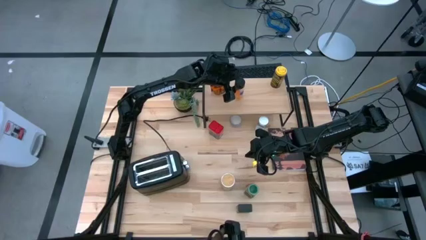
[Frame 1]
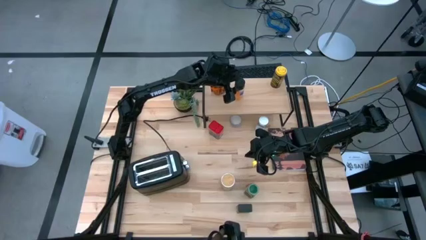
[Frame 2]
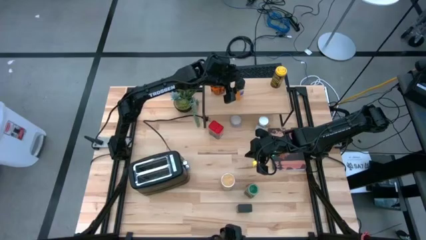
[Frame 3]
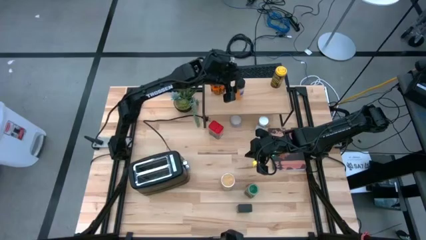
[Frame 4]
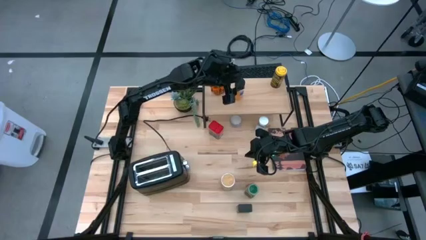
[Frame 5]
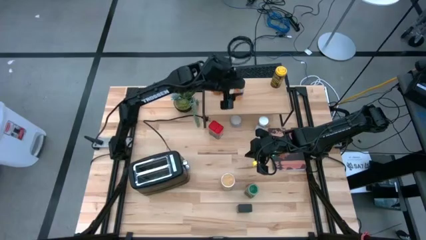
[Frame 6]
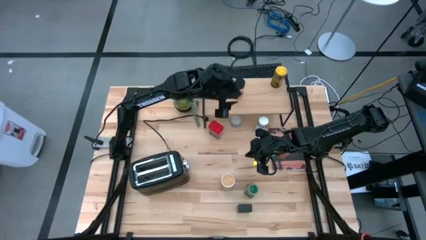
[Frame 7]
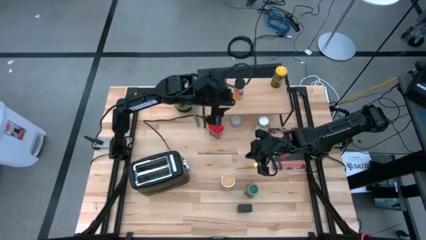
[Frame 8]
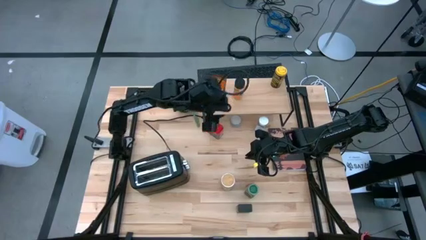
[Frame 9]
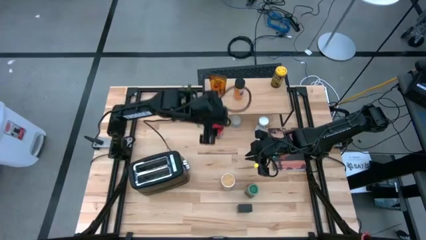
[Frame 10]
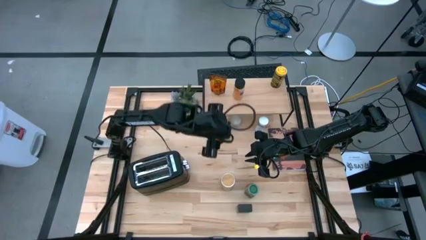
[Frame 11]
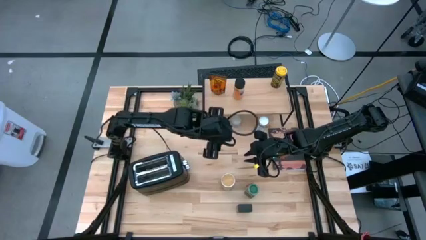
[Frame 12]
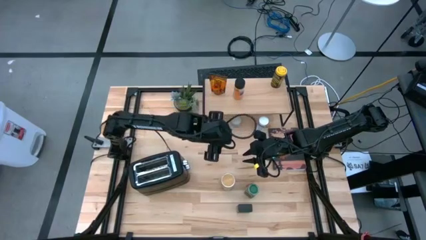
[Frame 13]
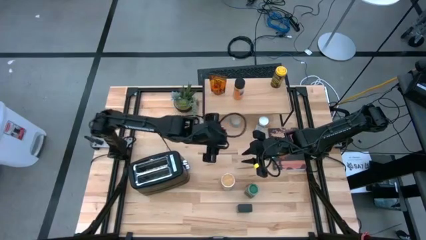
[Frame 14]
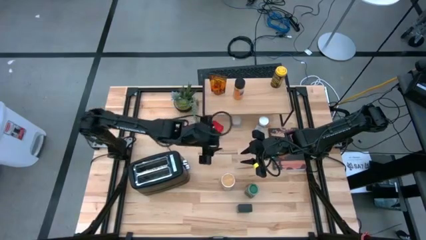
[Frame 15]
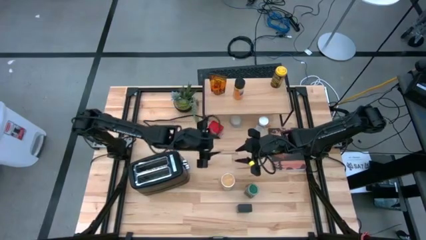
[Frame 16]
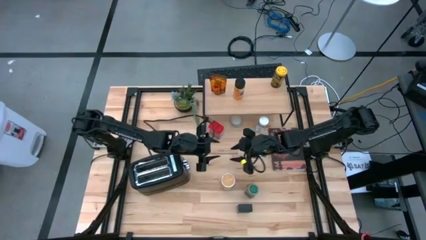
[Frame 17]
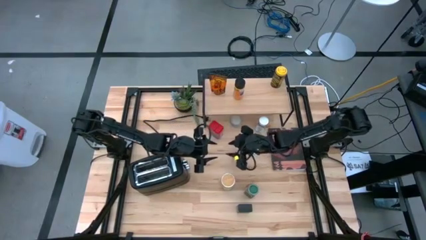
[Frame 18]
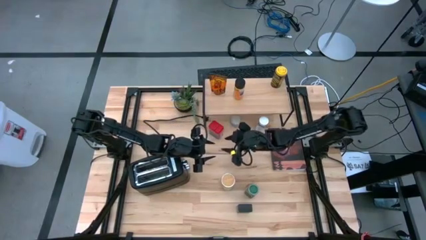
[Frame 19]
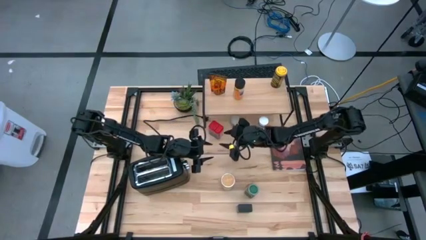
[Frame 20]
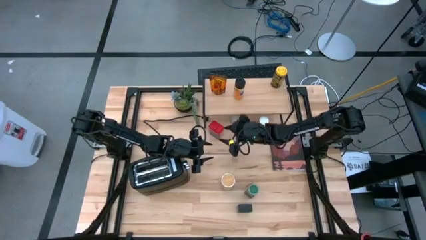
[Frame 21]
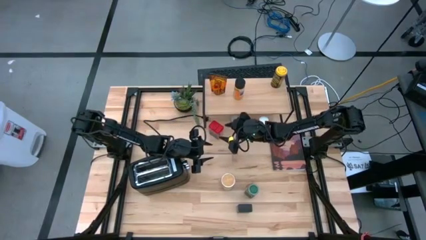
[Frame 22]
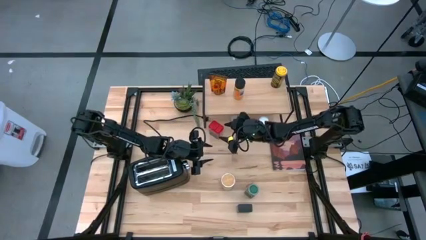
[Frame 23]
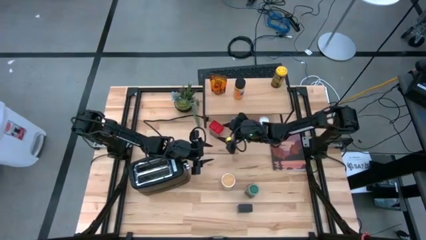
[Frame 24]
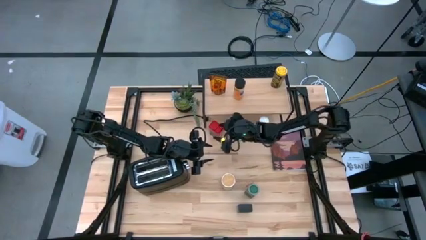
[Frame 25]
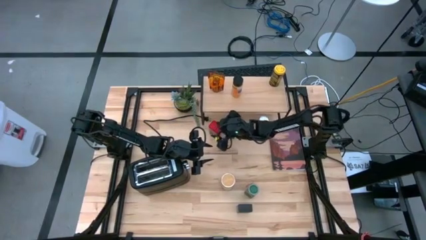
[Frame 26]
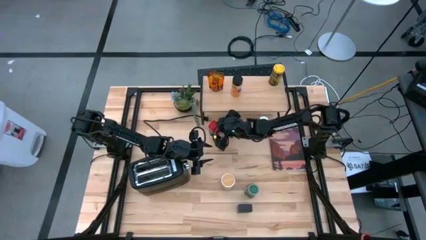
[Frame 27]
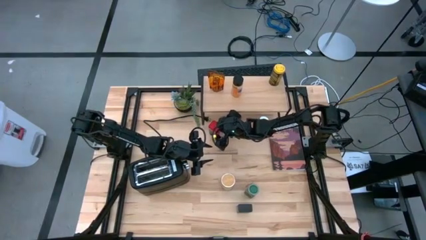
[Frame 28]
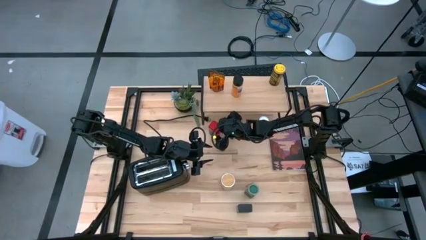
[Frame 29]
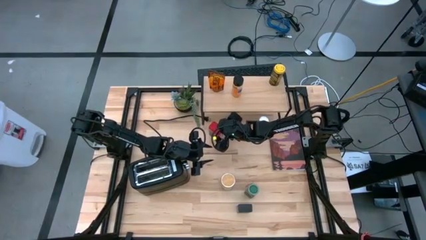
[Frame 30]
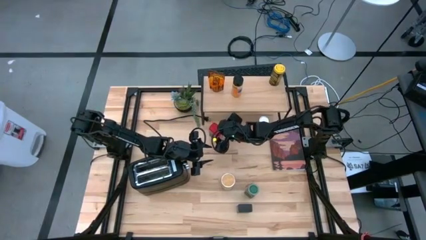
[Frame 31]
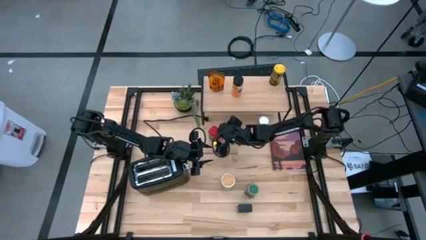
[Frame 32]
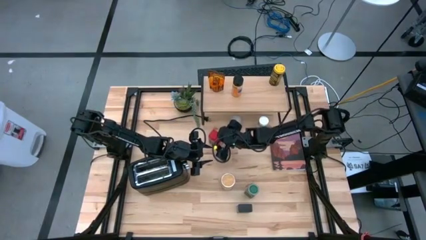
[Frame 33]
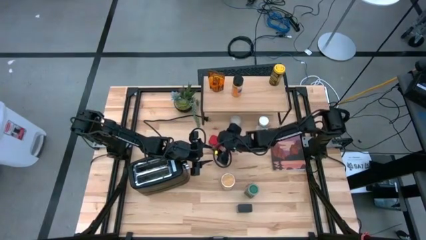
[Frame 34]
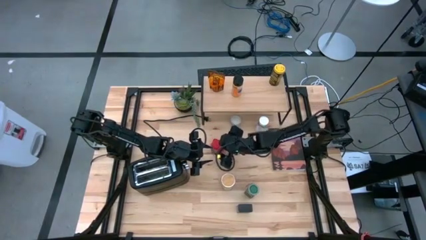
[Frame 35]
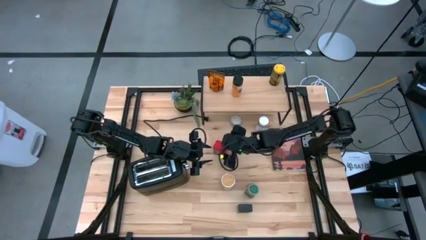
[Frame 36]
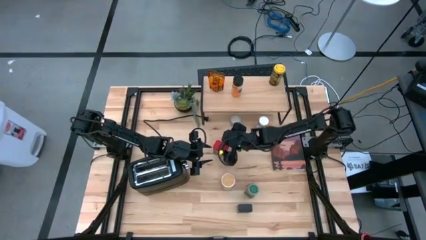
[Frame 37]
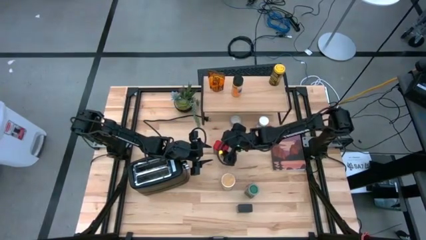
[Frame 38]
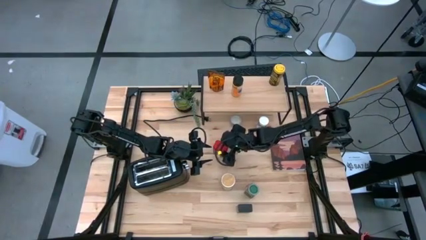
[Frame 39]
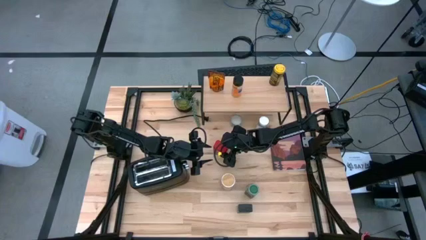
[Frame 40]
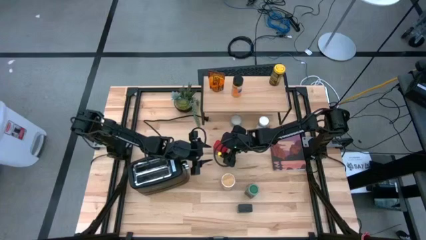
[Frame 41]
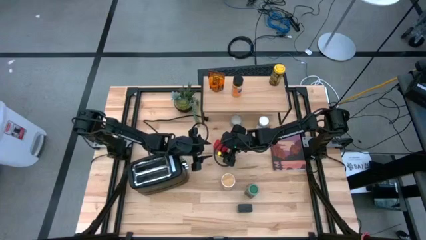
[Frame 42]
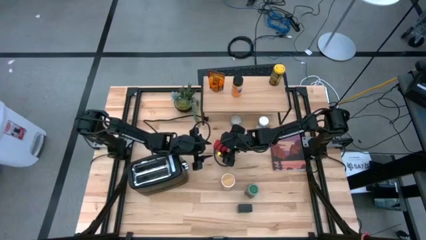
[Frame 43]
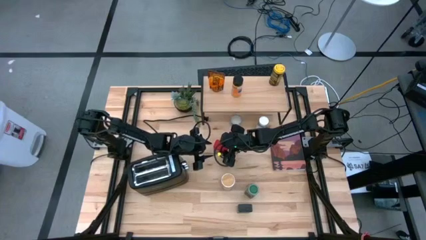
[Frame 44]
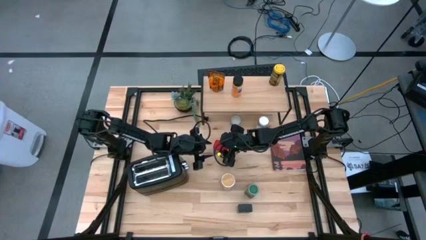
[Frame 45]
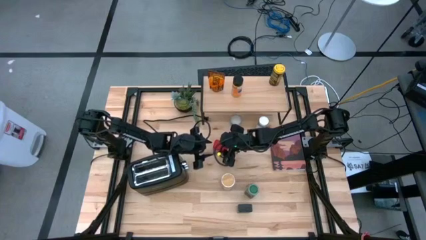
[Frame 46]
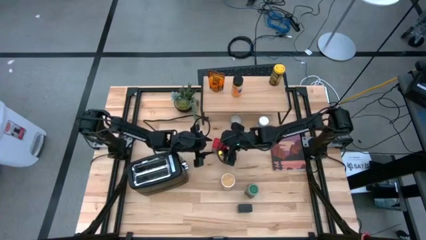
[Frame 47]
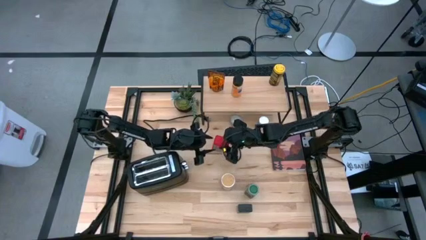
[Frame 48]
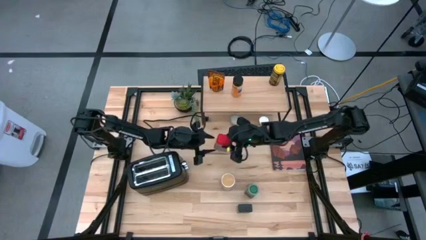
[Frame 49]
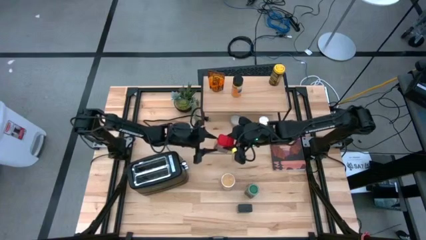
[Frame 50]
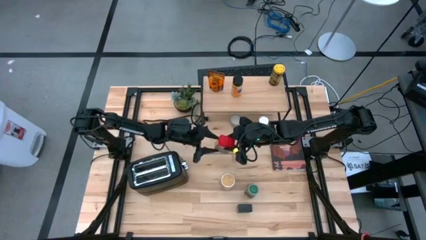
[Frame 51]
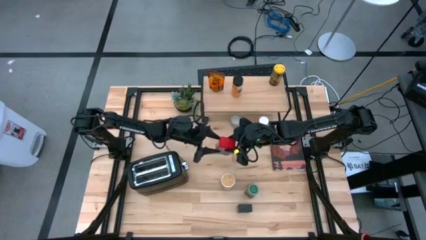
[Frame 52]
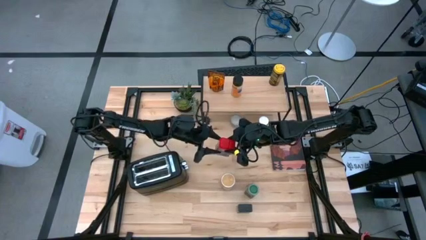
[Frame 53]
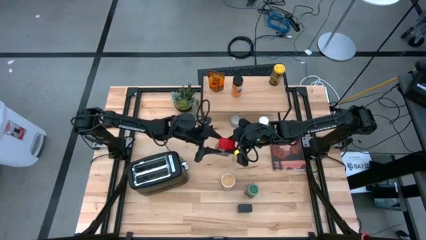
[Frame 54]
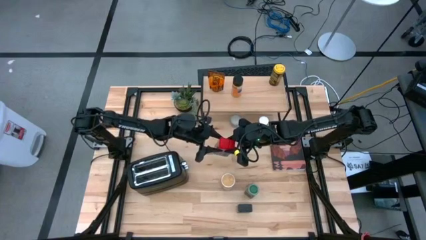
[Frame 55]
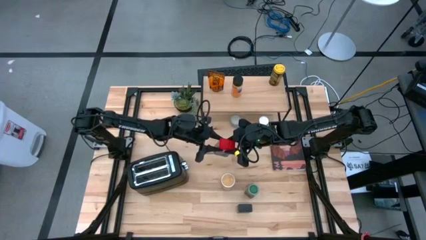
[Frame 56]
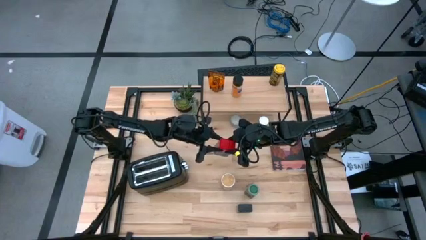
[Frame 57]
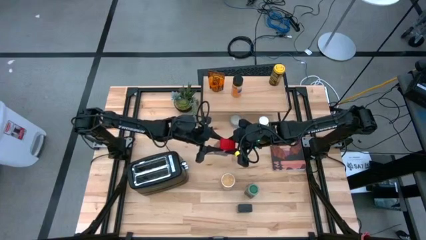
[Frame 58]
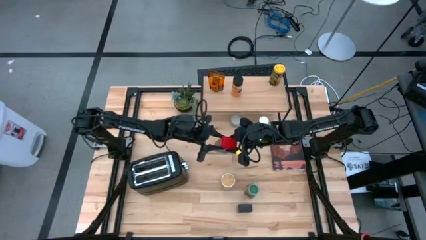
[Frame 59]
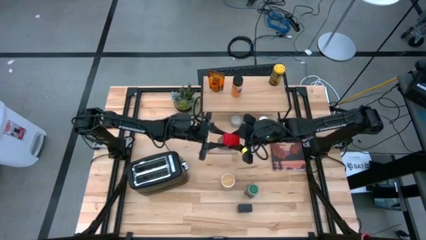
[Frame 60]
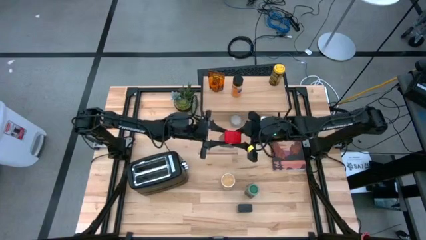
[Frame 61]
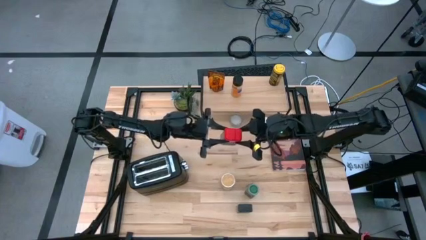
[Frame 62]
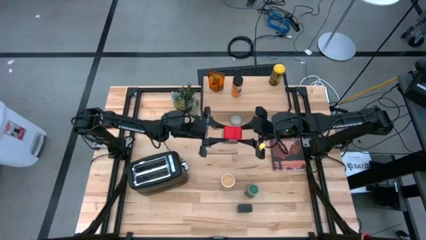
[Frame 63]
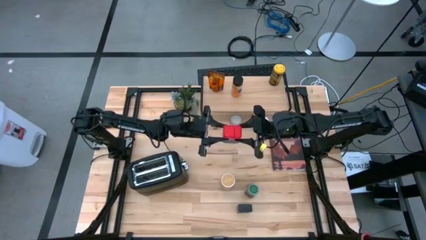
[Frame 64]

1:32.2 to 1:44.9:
Task: Shelf spices
Put the red seasoning can on the shelf

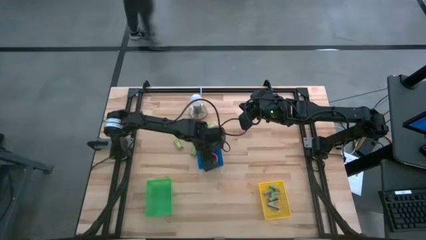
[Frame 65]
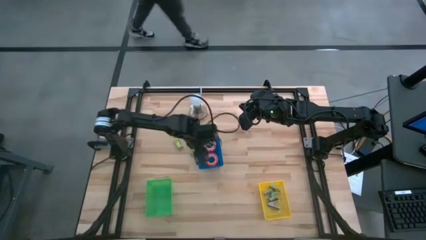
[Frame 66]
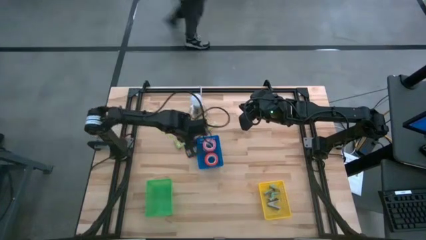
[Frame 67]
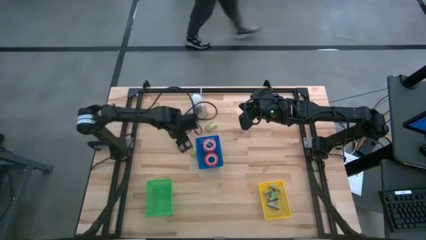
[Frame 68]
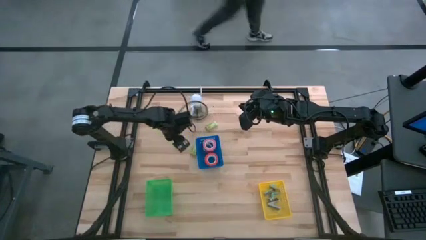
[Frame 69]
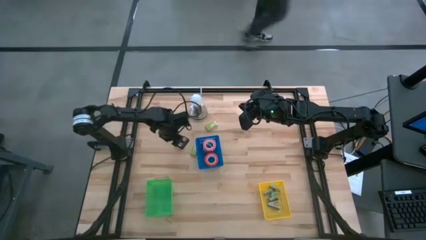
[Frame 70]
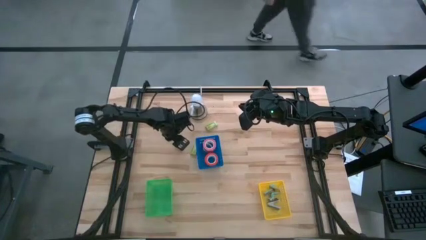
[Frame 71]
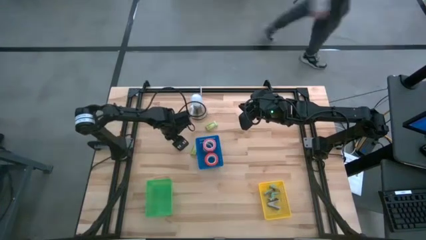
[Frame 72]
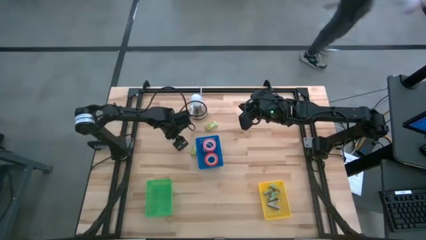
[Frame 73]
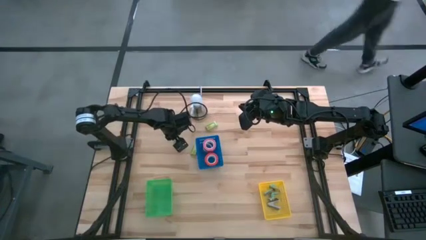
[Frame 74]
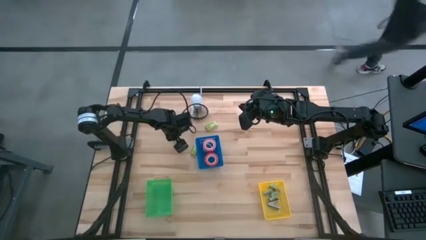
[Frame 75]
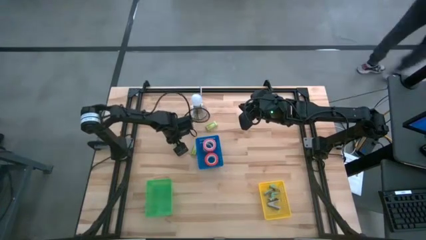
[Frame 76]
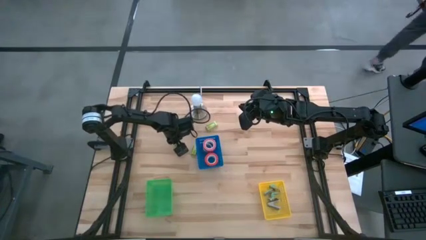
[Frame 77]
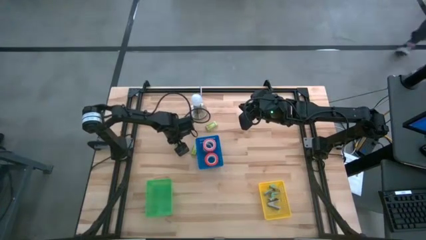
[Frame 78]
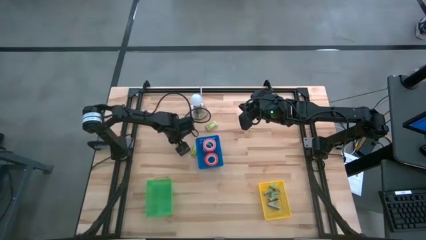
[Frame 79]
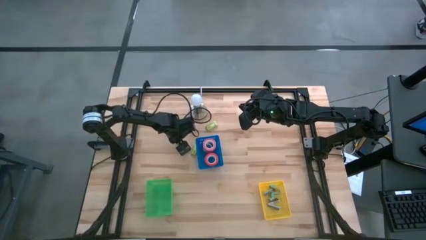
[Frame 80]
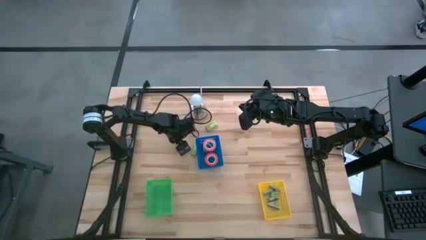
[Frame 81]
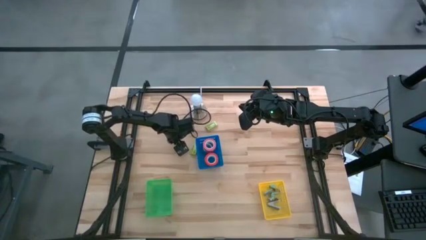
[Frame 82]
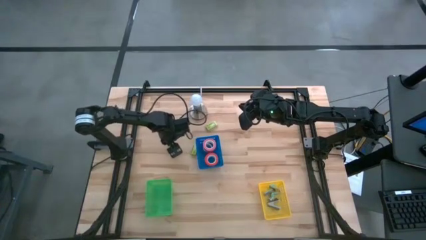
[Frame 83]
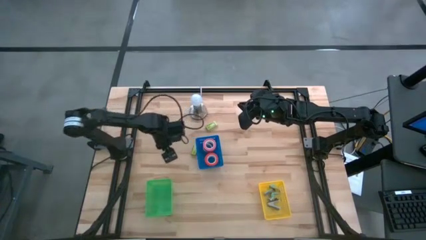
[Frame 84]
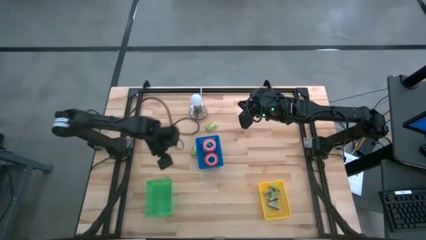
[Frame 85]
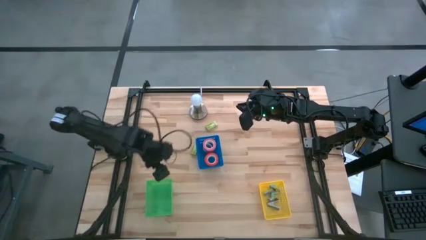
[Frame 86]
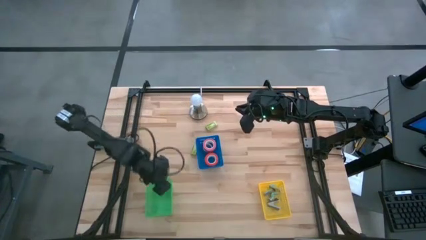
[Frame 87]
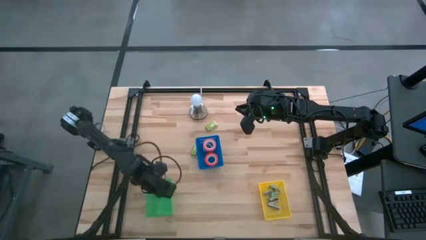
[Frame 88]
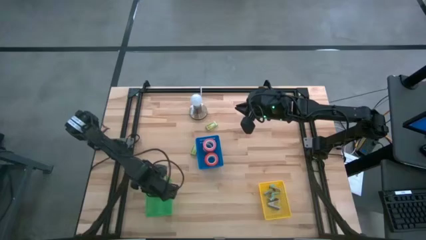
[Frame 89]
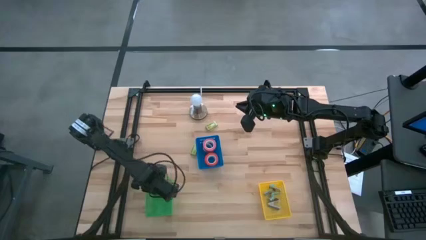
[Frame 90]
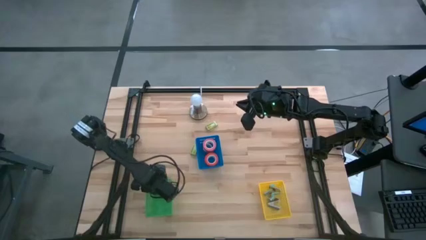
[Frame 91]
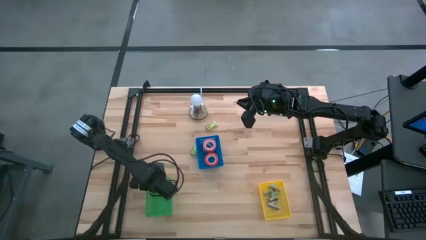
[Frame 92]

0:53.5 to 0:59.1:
Task: Pick and place Stapler, Stapler remover, tape
Put the bottom left green staple box into the green bin
